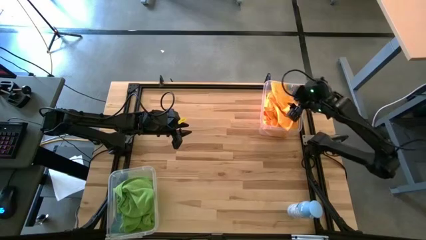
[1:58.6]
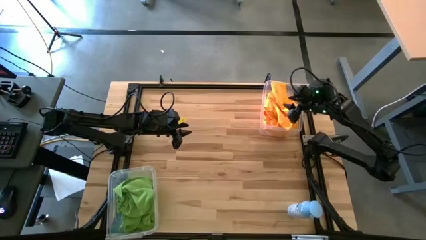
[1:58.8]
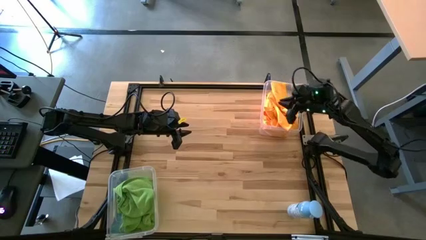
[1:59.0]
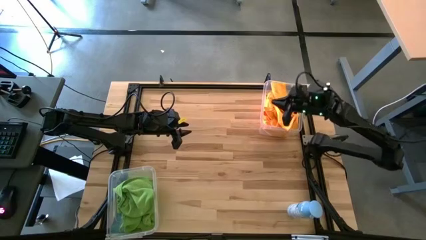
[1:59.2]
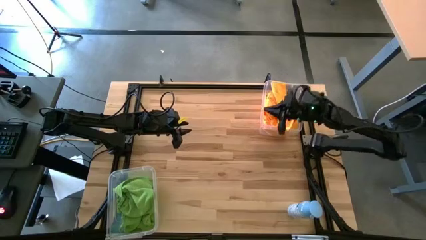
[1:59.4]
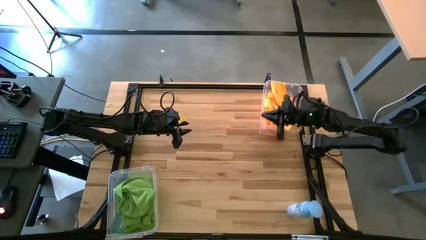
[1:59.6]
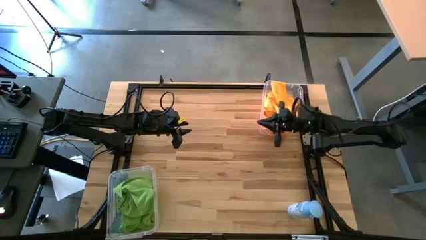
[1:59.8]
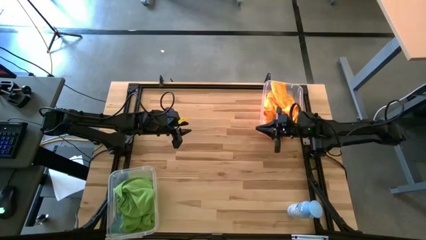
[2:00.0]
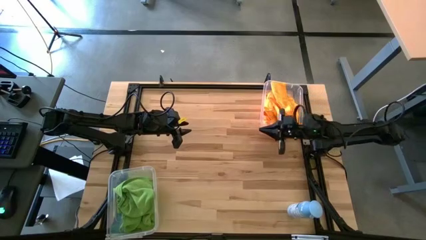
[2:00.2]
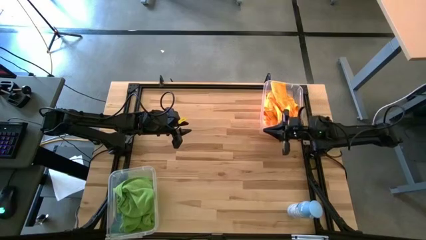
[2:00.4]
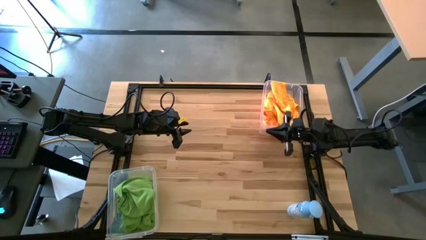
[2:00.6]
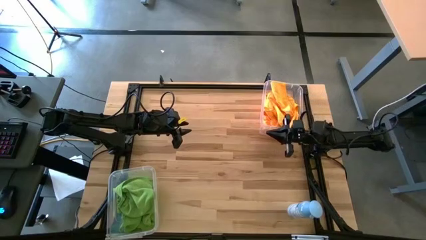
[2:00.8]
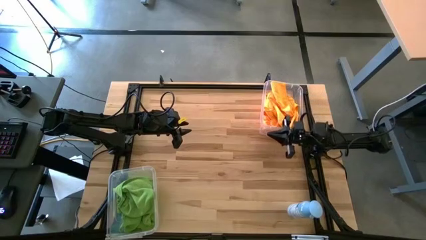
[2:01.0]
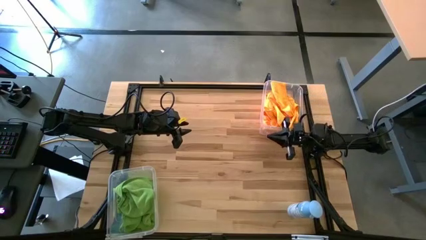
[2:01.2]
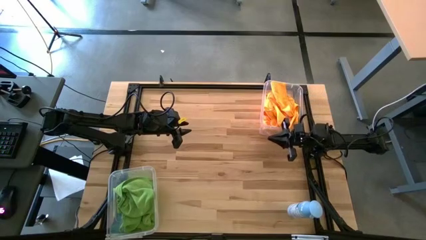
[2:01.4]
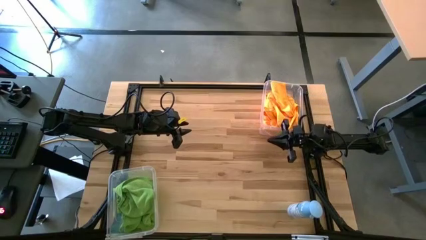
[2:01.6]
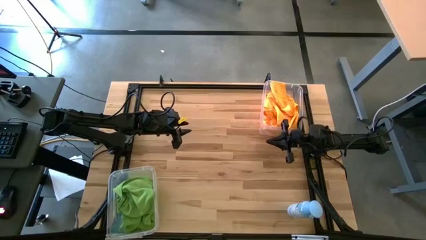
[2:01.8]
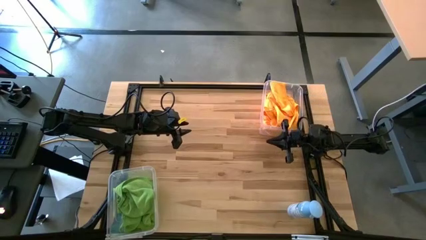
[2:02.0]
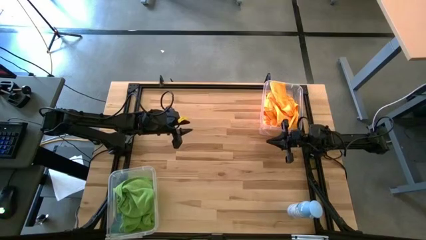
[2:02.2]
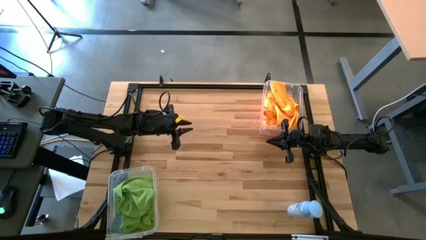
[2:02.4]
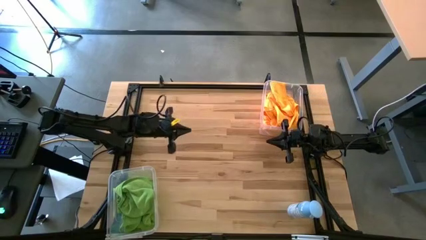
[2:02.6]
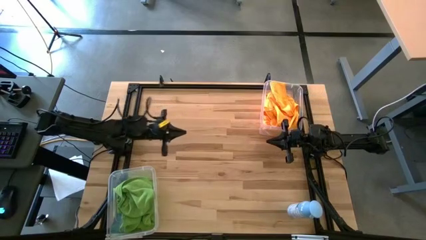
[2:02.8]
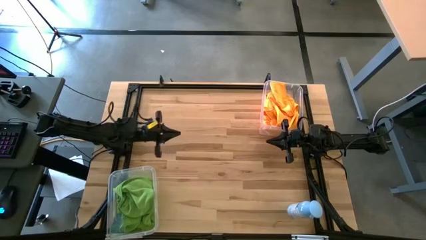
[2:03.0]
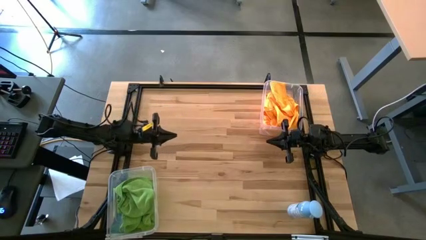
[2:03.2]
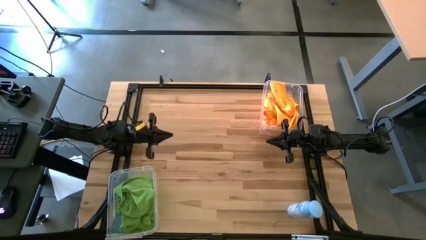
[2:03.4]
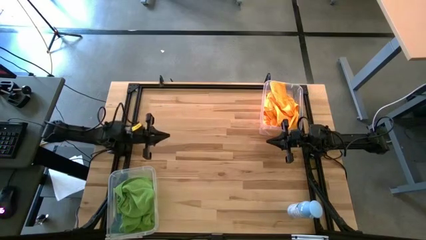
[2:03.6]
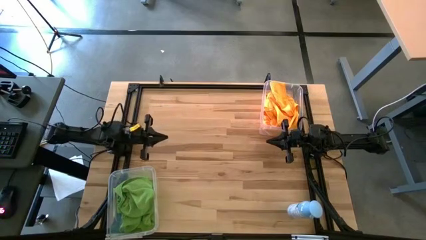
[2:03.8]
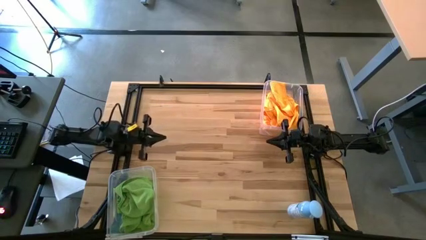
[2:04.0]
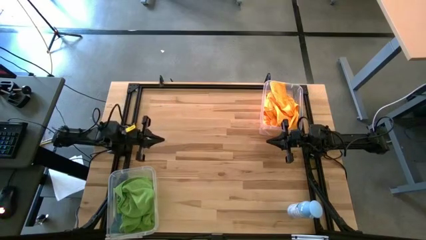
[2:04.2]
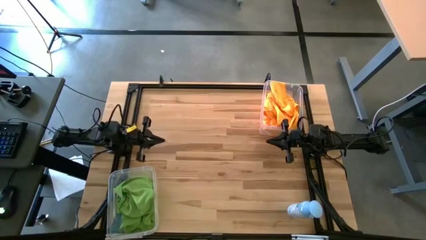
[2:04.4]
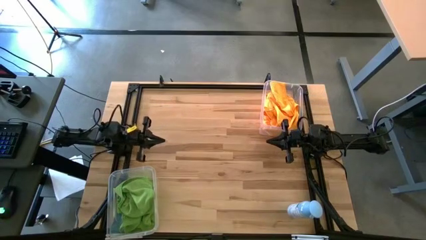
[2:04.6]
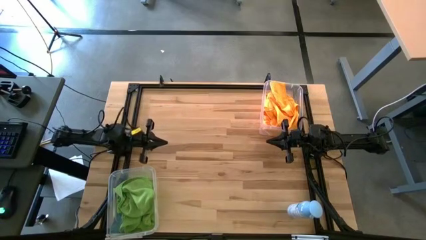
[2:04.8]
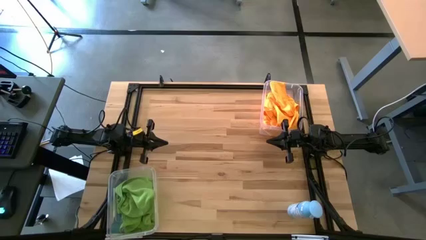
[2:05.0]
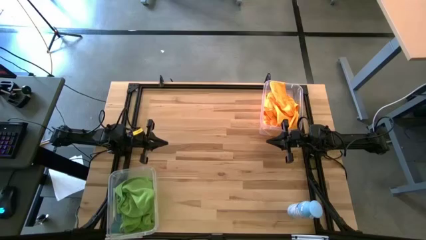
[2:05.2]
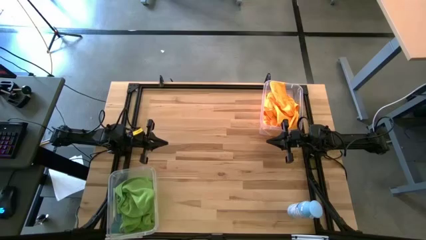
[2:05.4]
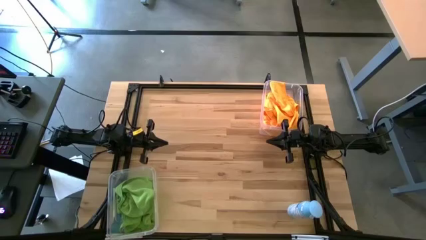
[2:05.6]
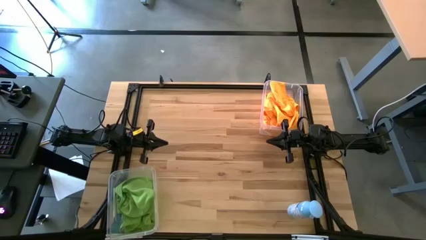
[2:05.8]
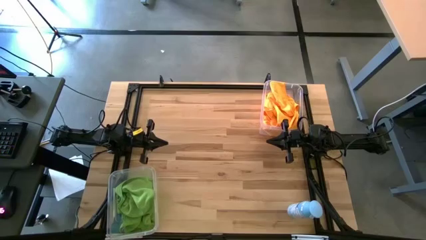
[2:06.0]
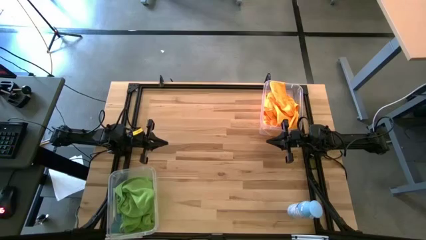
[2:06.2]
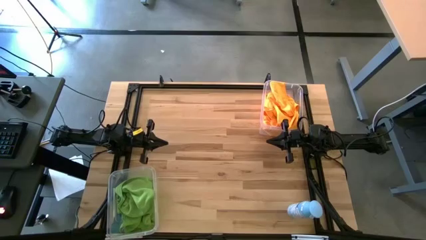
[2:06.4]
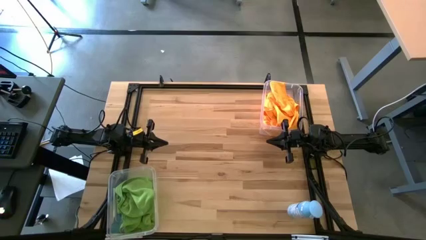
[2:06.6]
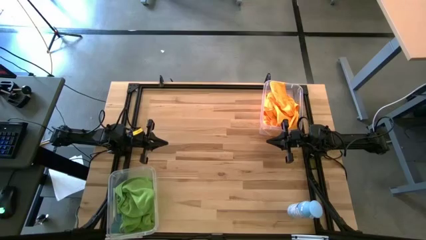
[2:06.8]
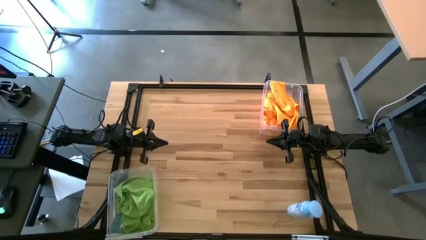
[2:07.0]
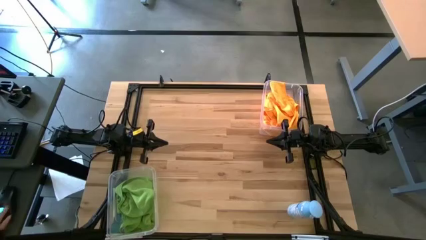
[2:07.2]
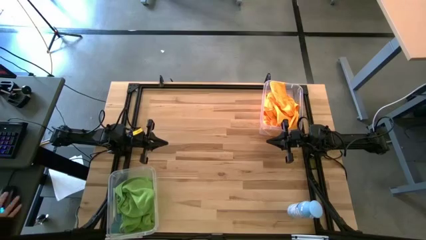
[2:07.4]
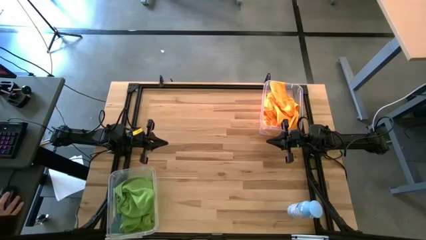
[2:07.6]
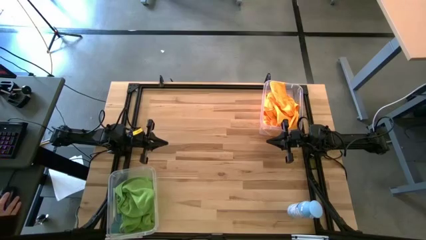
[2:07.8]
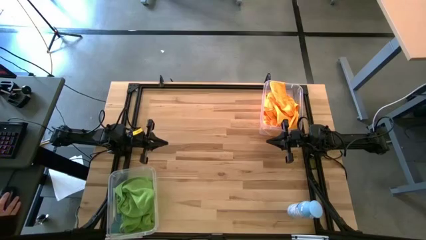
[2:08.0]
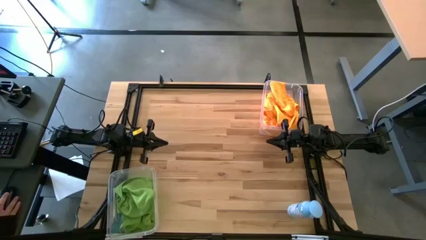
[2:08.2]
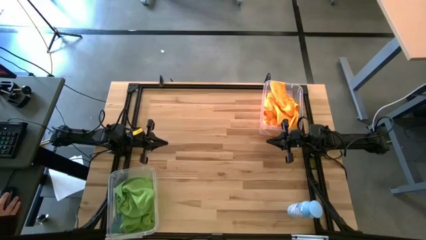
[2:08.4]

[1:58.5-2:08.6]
Task: Sort microfiber towel by color & place in baskets
Return to Home Position
